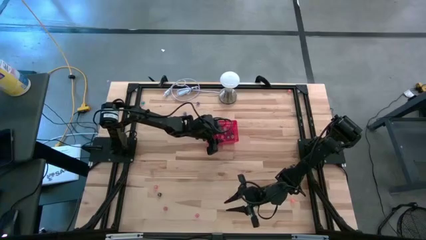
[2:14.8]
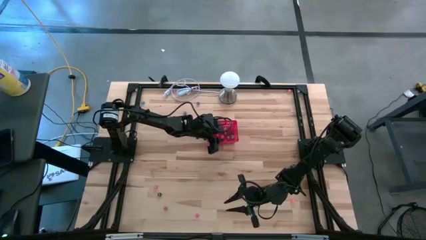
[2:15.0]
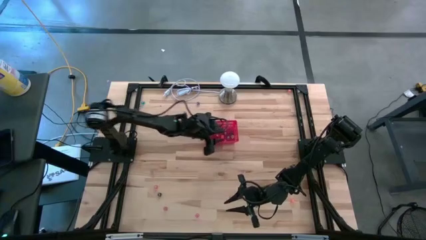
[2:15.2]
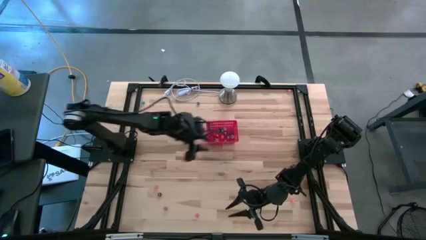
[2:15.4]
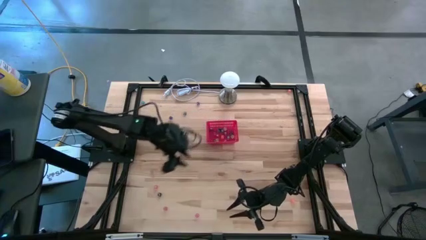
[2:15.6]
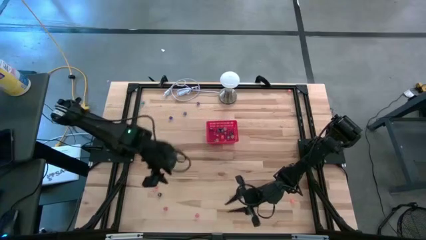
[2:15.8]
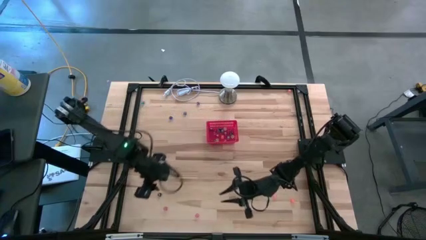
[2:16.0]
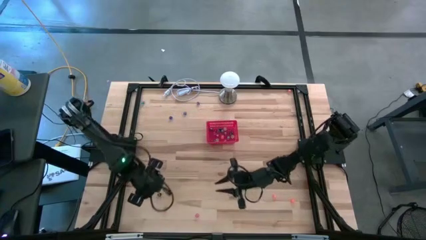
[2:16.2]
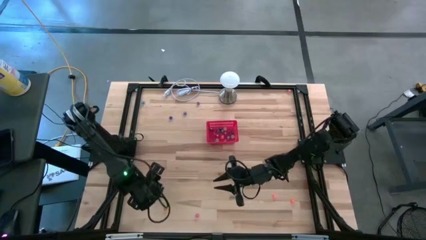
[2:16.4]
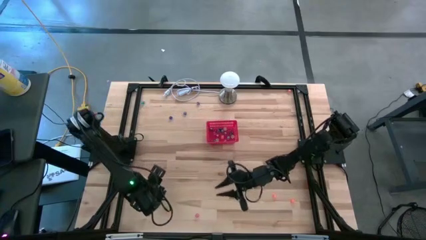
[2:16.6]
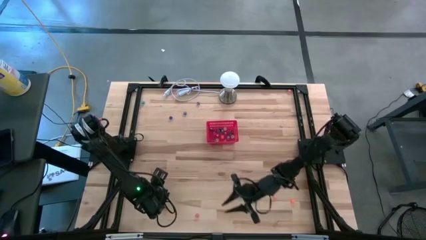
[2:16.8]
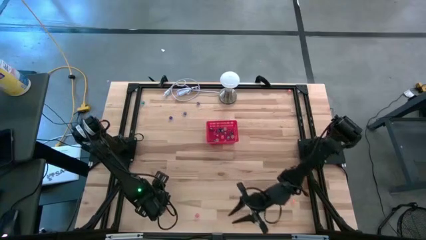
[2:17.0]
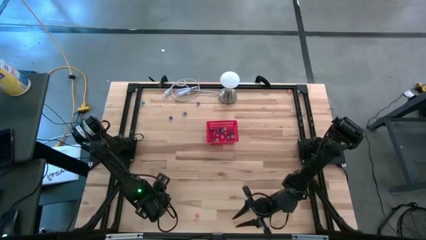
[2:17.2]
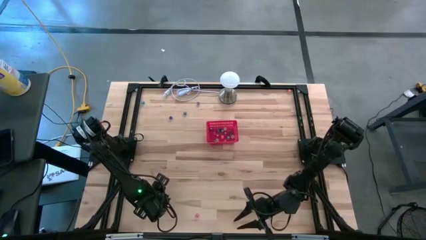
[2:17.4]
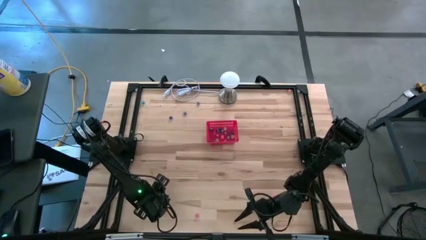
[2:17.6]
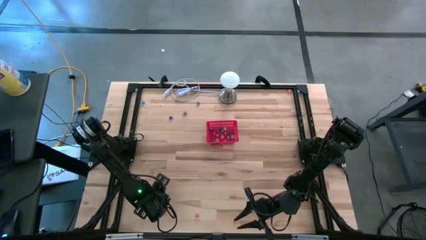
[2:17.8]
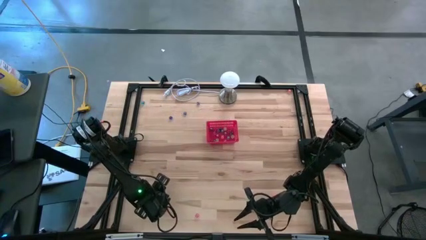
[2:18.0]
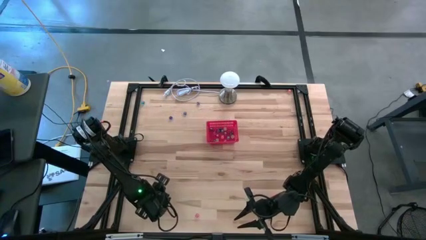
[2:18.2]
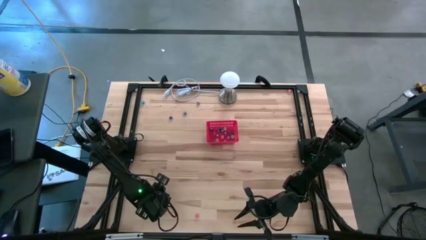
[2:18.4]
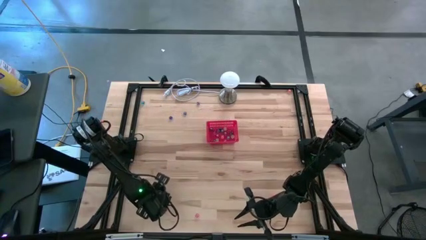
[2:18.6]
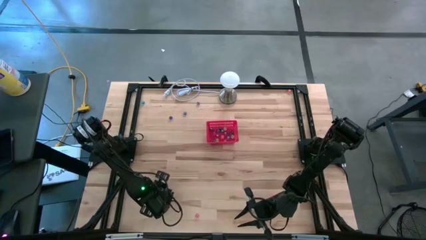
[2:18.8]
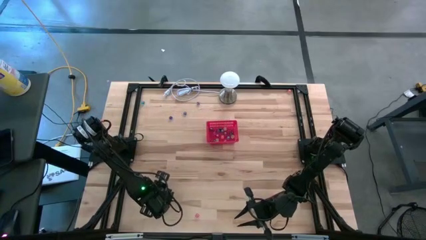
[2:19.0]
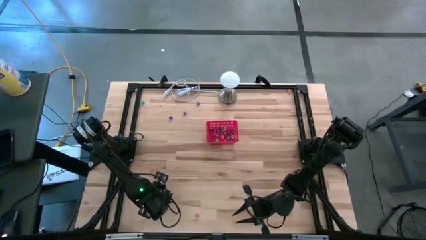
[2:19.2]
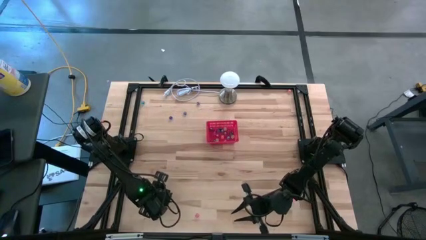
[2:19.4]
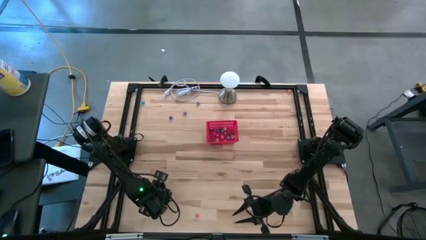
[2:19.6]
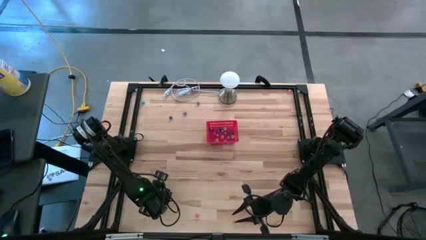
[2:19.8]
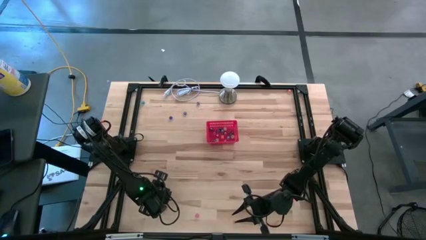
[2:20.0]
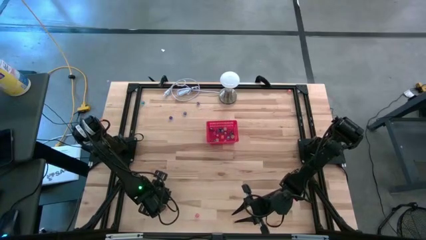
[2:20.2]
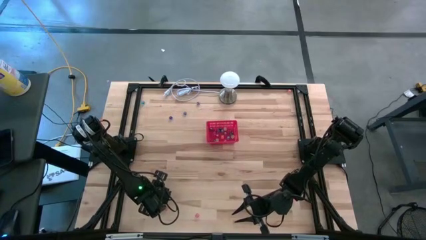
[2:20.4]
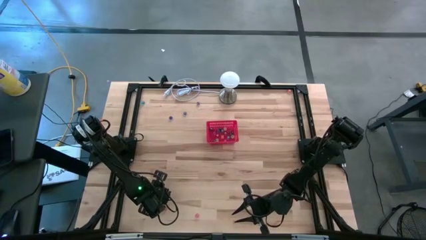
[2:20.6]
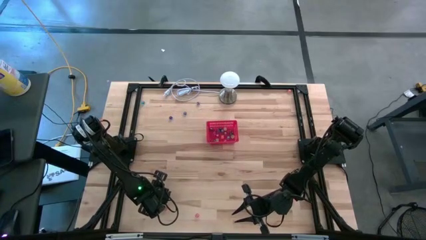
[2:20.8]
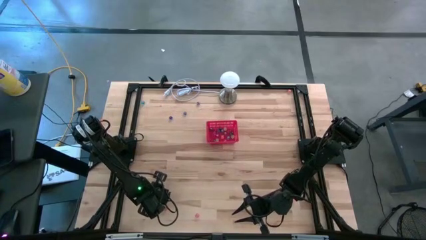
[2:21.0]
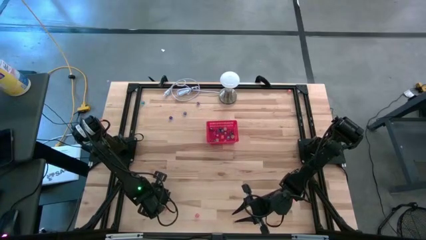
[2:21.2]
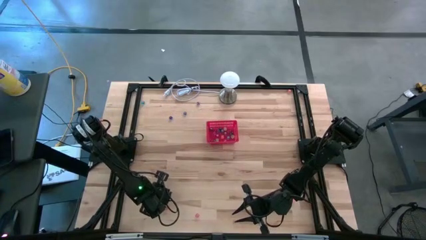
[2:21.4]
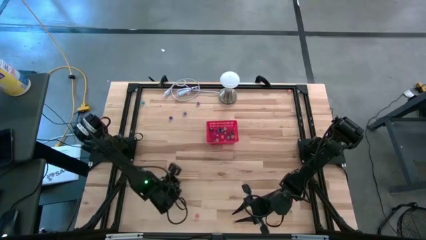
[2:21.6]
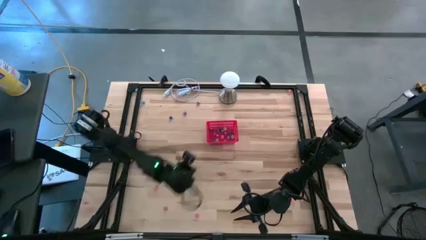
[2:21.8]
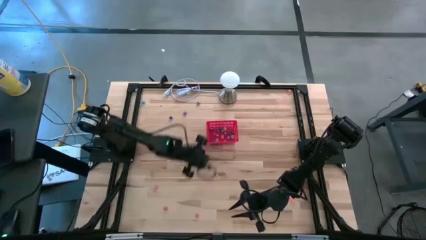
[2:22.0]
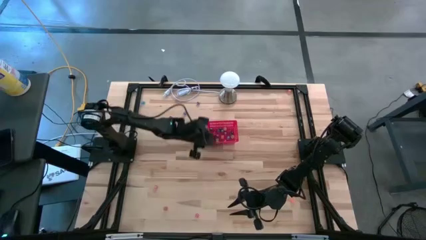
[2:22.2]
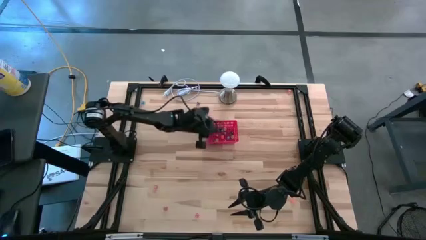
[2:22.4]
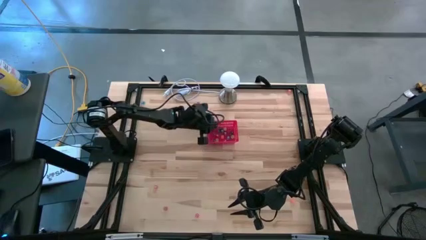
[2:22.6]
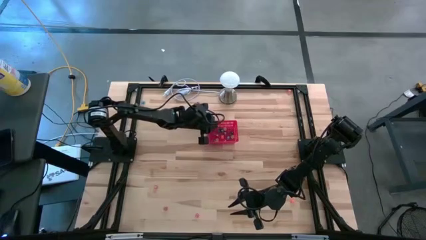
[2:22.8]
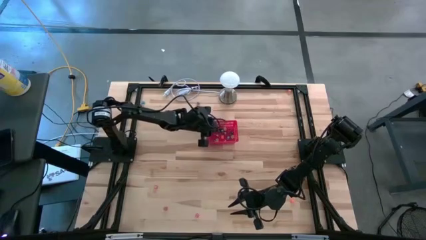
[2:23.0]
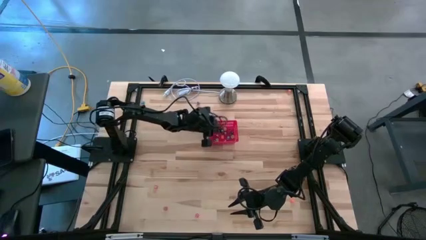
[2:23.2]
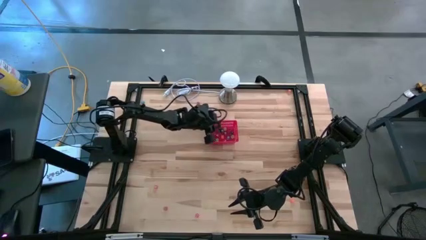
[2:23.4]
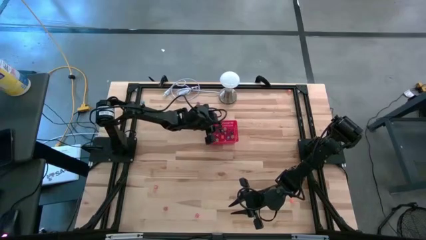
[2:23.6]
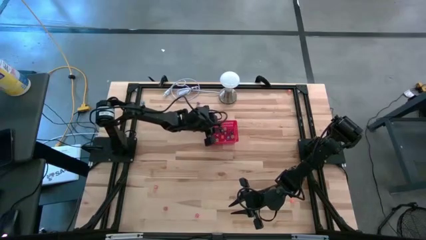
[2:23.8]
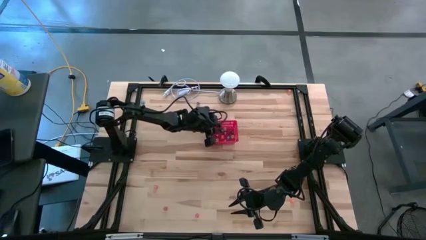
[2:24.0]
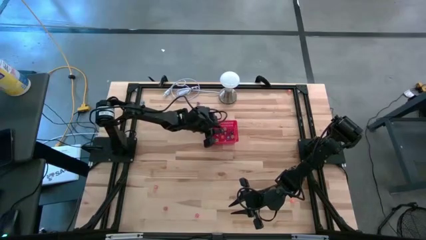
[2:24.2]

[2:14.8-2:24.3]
Task: Pick & Place Dice
Put the black dice into the bin

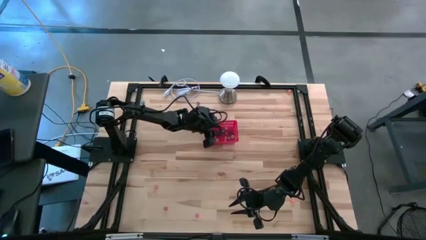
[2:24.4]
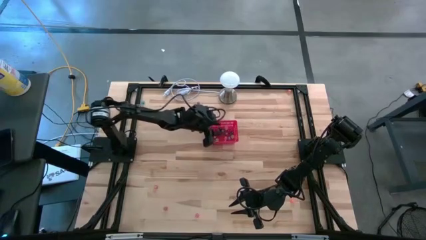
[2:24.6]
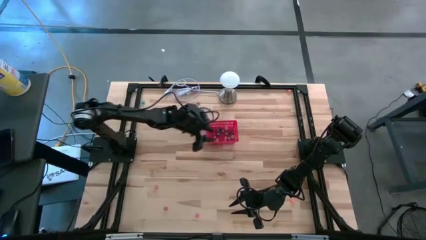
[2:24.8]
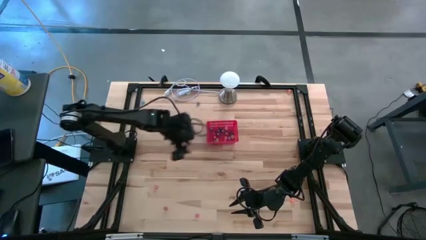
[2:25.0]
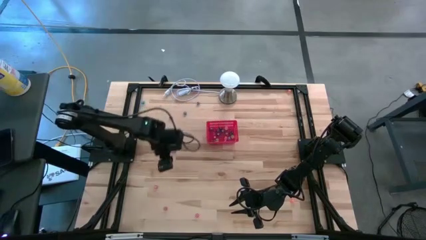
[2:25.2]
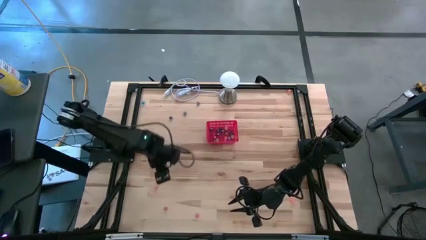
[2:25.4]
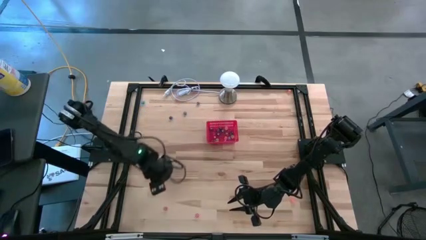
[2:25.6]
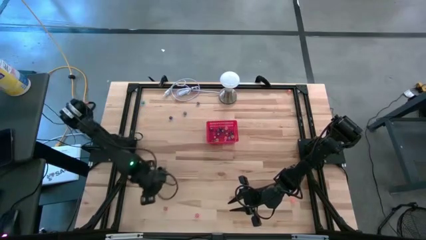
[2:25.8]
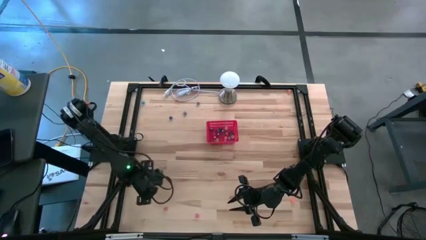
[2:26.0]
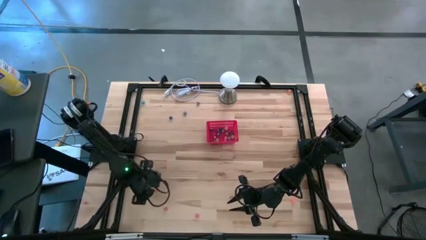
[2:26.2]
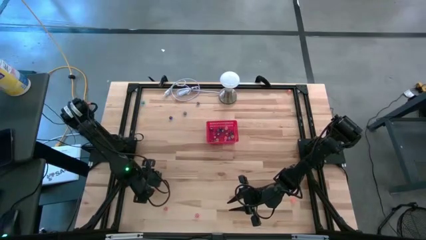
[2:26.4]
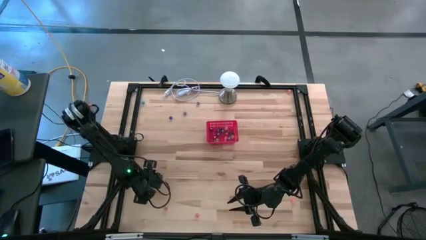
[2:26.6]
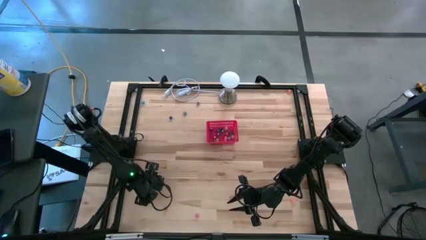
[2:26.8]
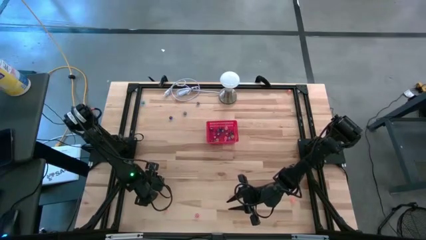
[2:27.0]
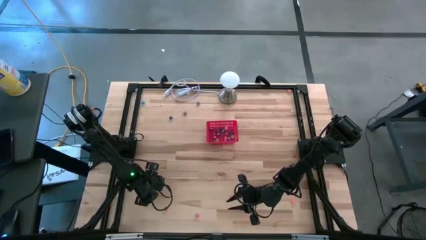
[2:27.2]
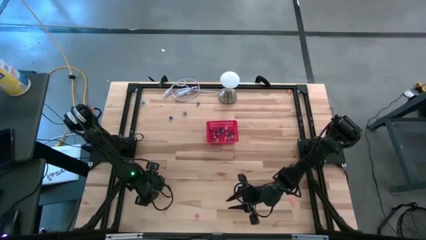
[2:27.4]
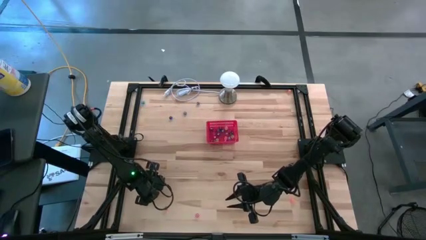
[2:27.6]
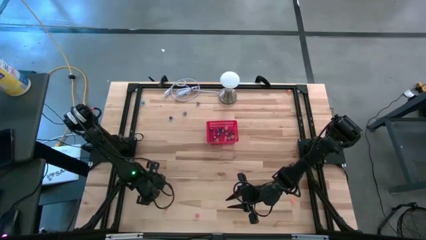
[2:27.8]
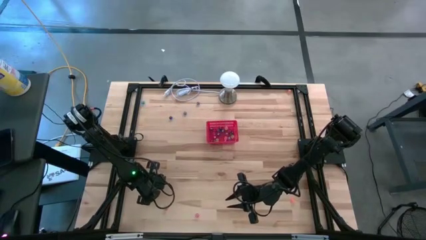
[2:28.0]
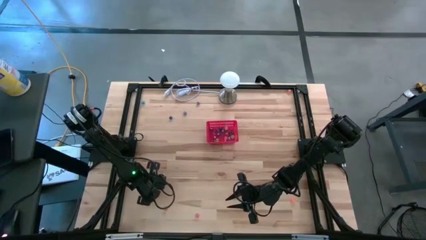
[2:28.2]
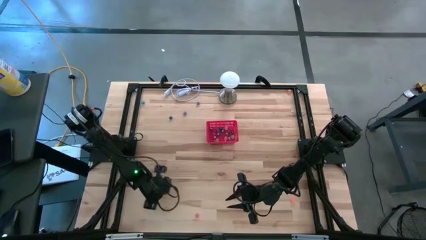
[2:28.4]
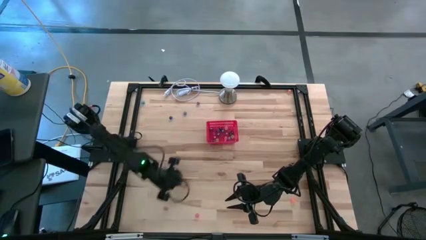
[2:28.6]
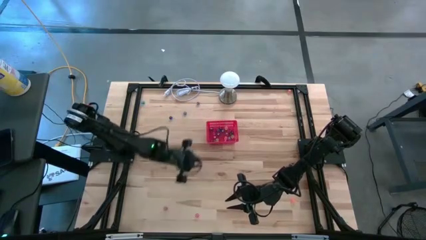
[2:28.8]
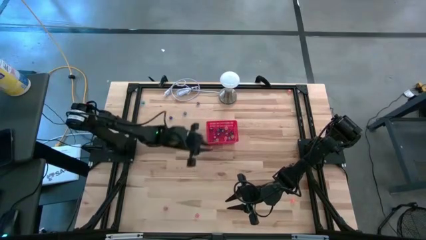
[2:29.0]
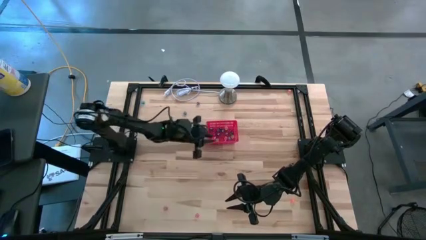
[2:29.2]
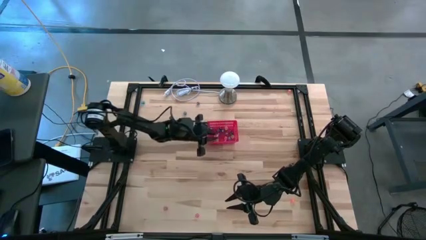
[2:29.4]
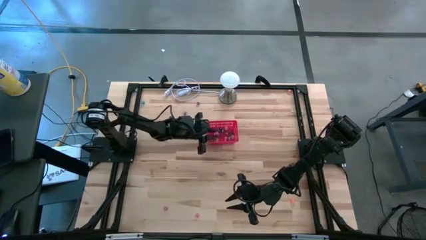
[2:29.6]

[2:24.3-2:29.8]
Put the left pink dice into the bin

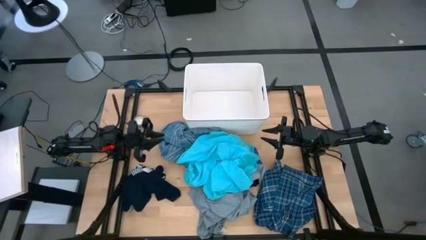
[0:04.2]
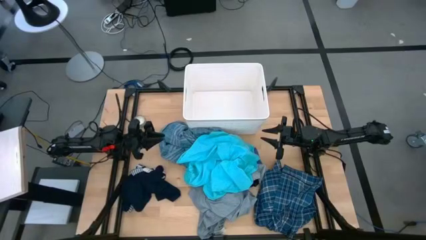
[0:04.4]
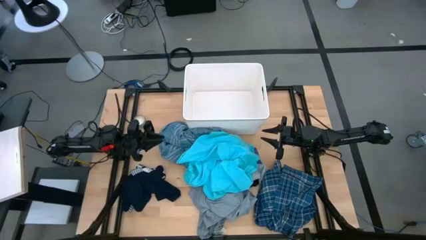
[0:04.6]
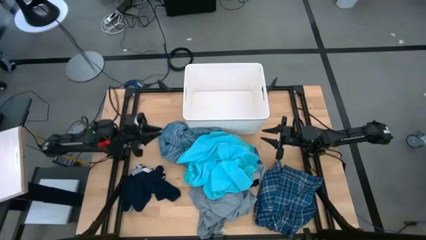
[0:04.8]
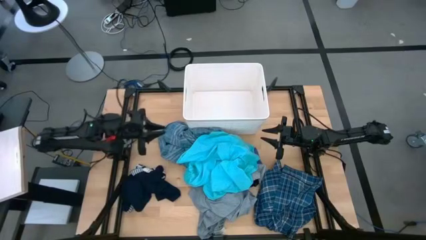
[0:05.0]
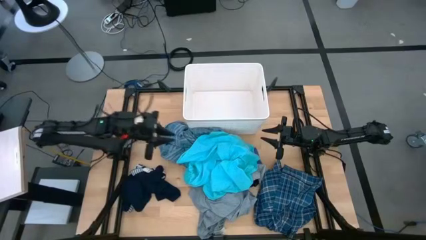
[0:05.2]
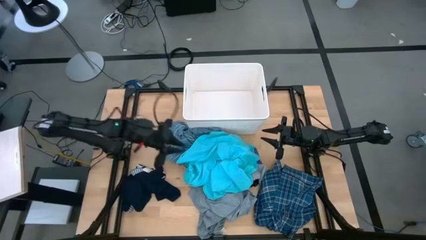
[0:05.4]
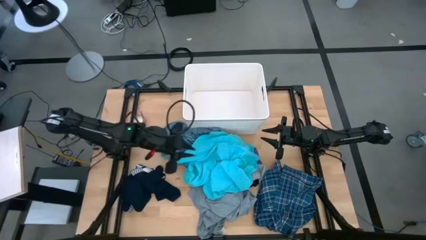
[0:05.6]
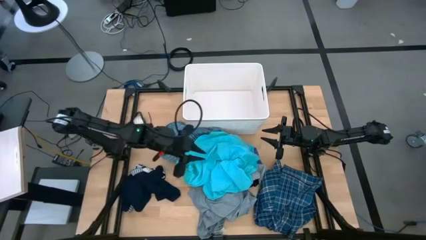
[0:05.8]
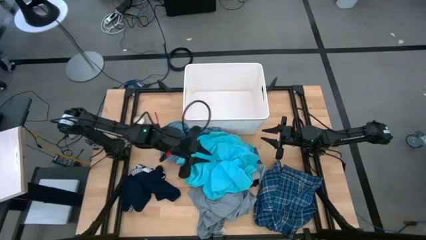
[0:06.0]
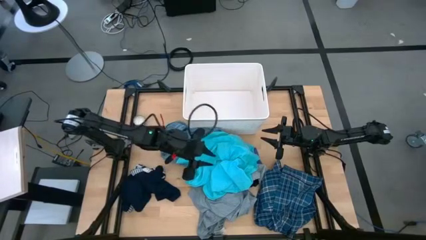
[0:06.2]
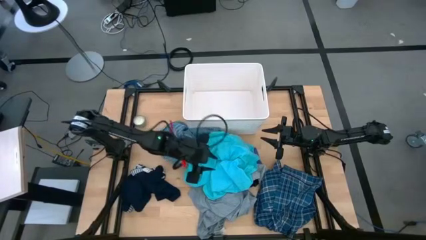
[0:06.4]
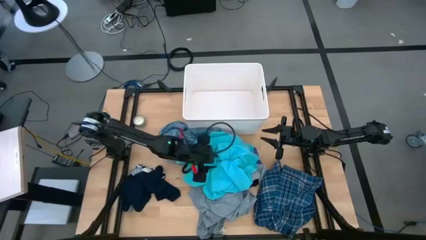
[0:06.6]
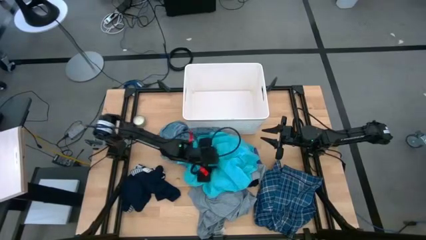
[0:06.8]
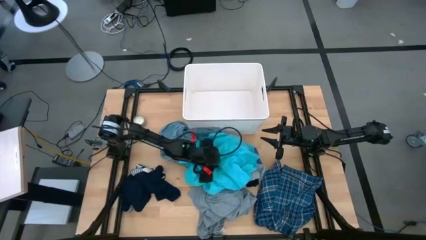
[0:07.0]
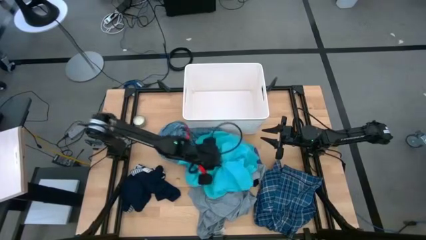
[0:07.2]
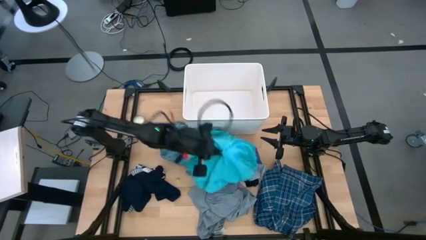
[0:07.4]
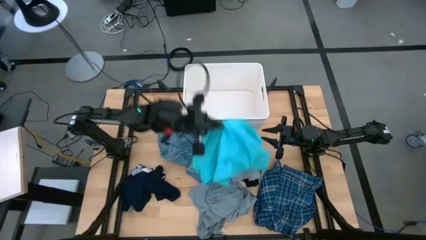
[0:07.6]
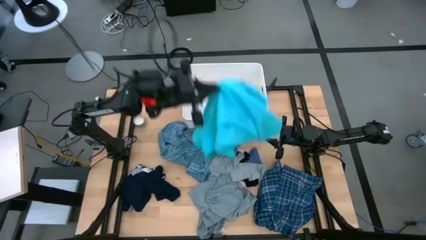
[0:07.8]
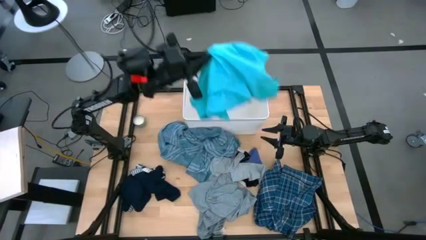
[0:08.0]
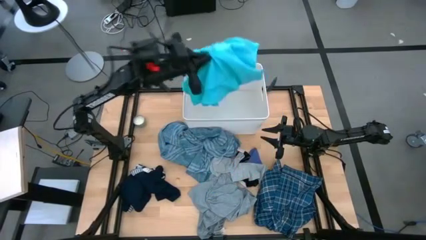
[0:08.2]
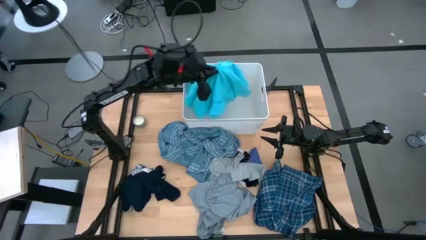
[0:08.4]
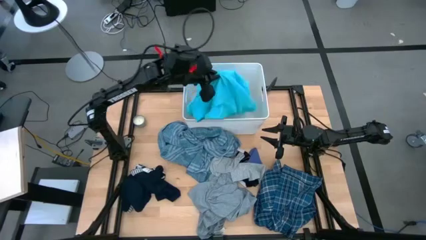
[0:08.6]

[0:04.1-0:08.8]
Task: Sort clothes
Put the light blue shorts into the white laundry organizer
